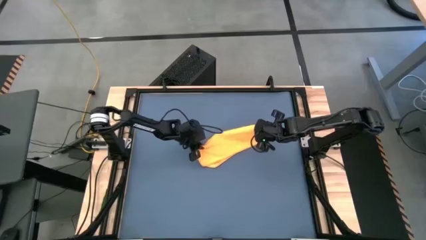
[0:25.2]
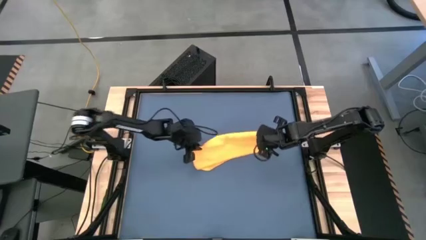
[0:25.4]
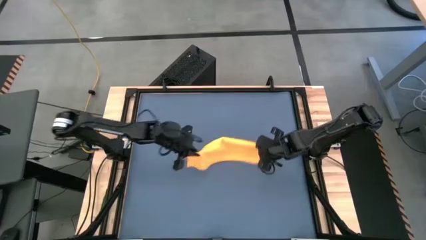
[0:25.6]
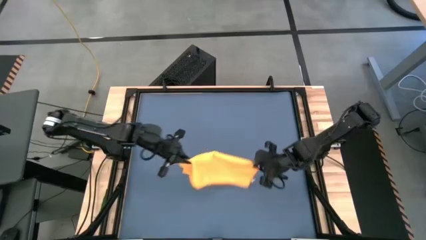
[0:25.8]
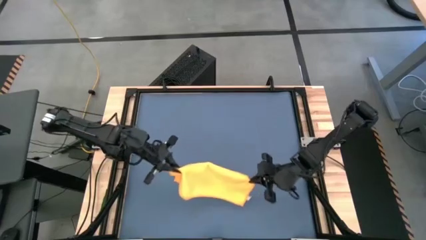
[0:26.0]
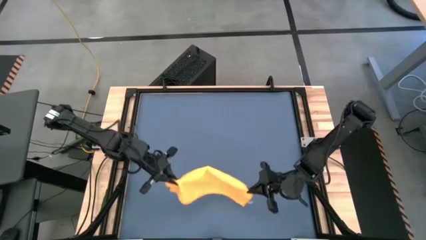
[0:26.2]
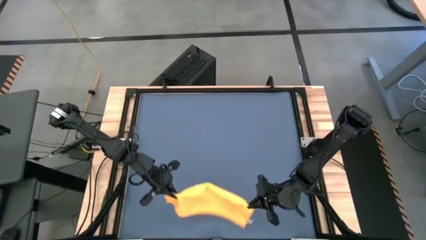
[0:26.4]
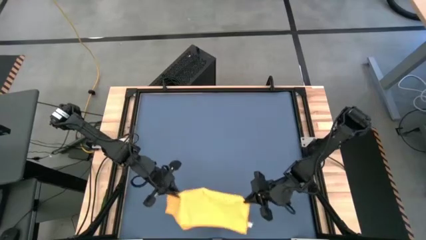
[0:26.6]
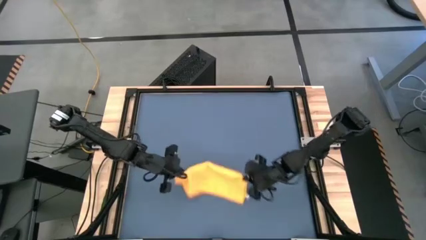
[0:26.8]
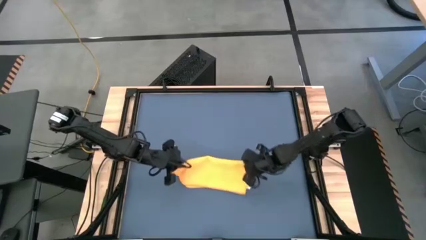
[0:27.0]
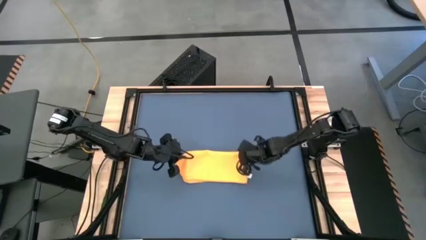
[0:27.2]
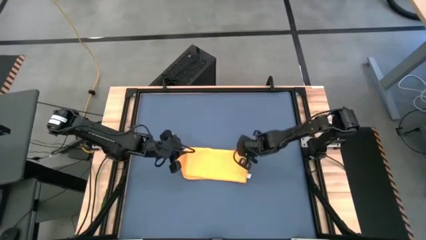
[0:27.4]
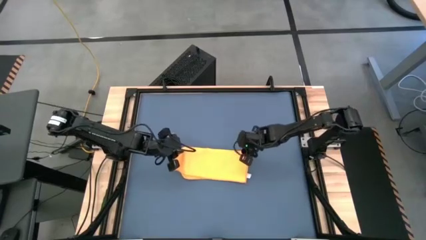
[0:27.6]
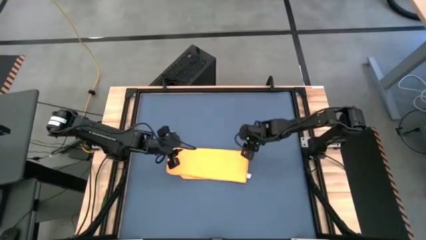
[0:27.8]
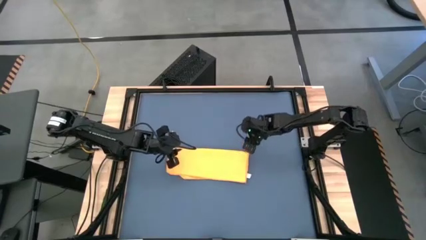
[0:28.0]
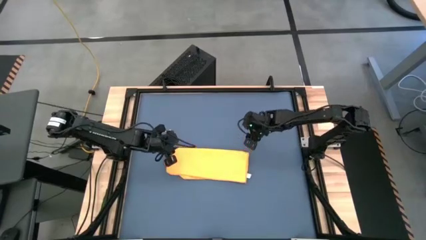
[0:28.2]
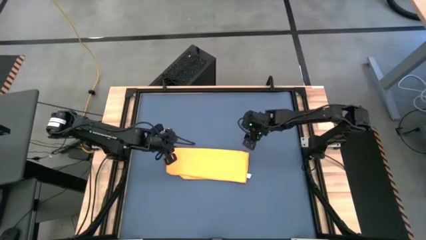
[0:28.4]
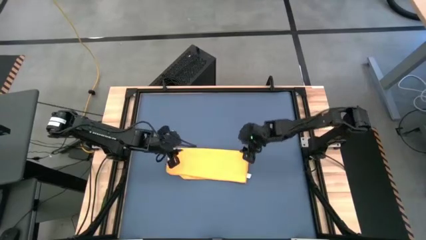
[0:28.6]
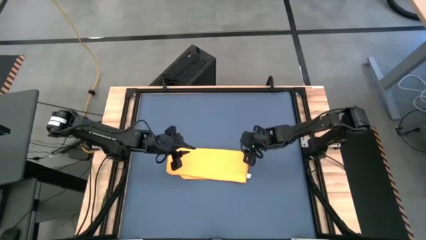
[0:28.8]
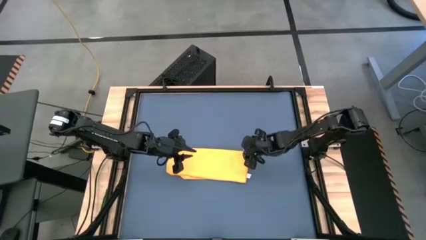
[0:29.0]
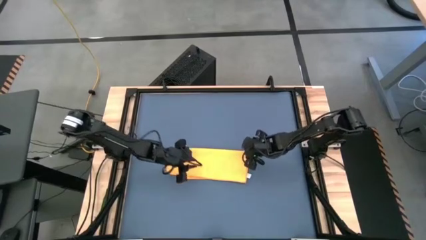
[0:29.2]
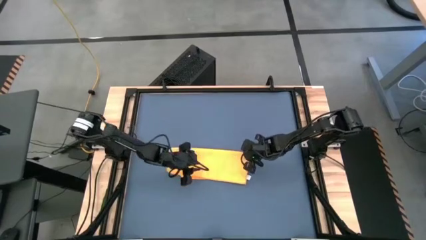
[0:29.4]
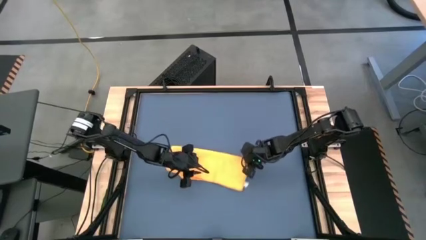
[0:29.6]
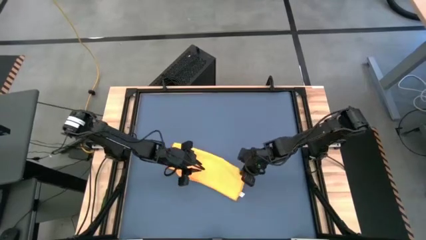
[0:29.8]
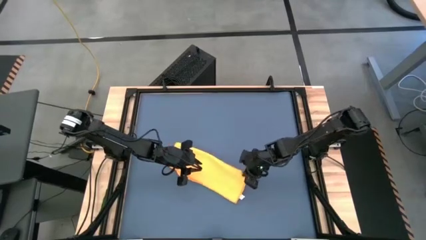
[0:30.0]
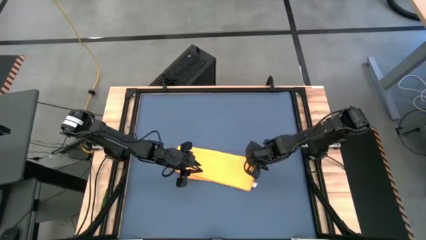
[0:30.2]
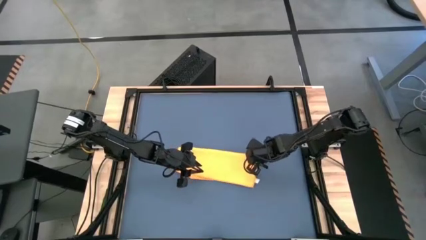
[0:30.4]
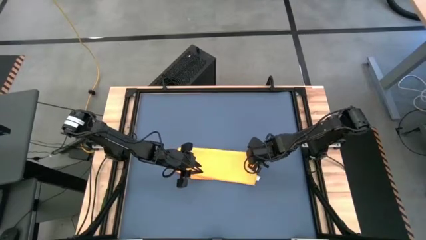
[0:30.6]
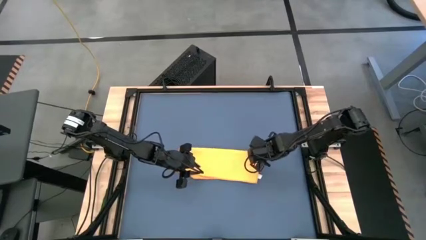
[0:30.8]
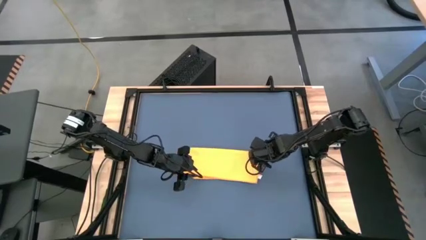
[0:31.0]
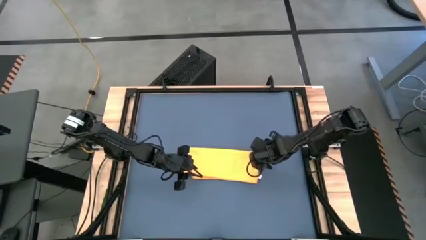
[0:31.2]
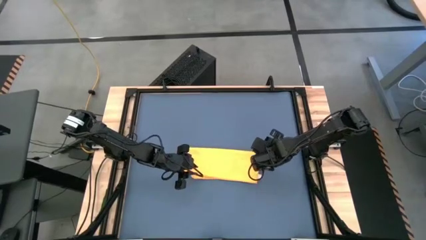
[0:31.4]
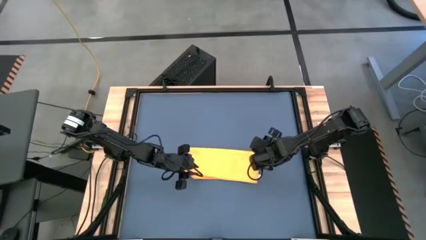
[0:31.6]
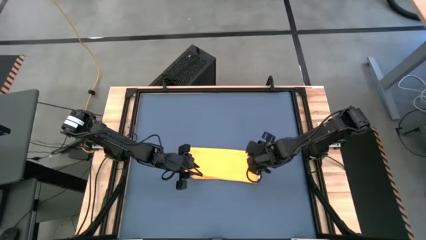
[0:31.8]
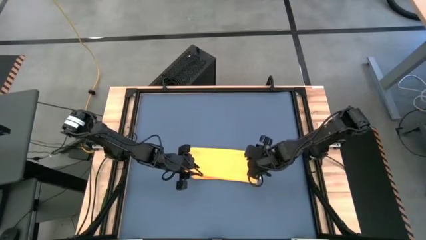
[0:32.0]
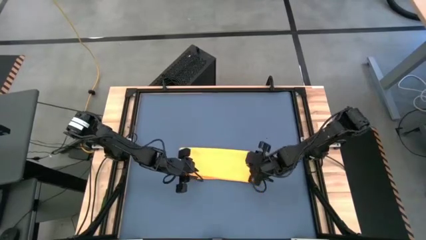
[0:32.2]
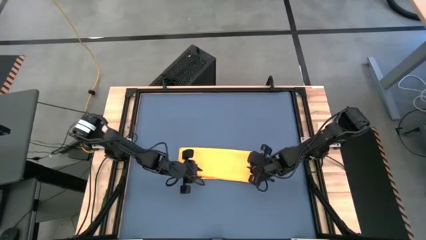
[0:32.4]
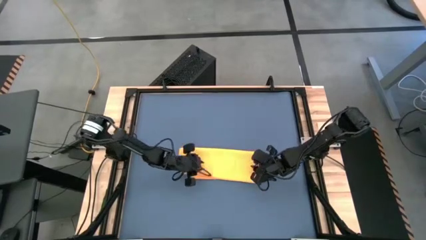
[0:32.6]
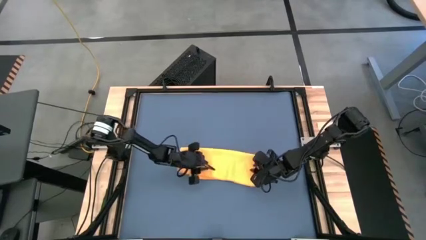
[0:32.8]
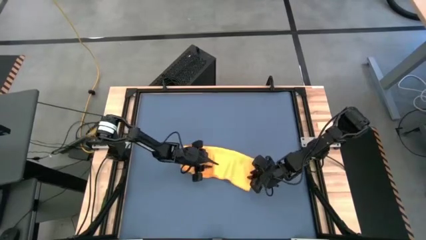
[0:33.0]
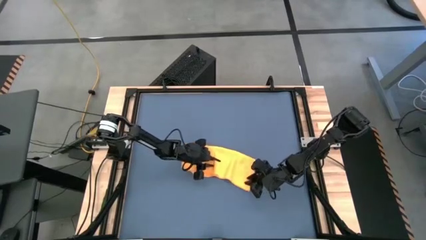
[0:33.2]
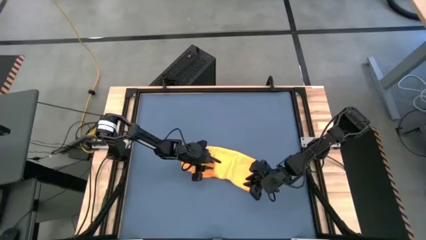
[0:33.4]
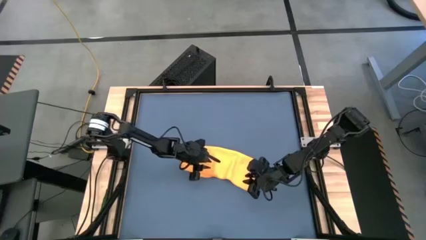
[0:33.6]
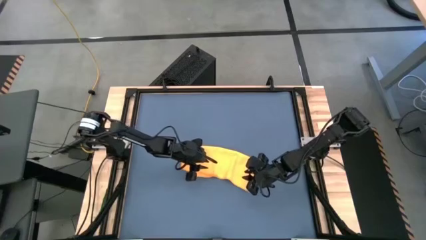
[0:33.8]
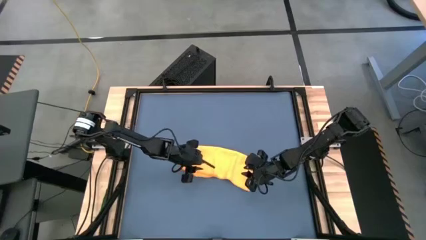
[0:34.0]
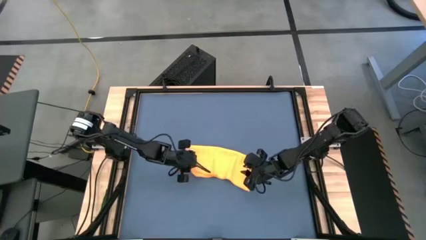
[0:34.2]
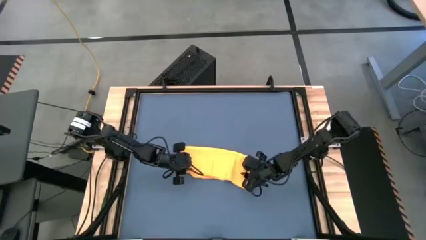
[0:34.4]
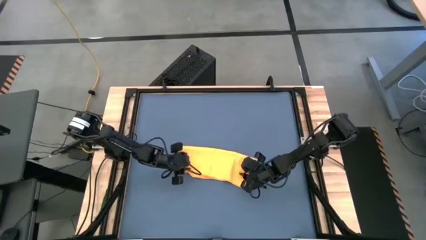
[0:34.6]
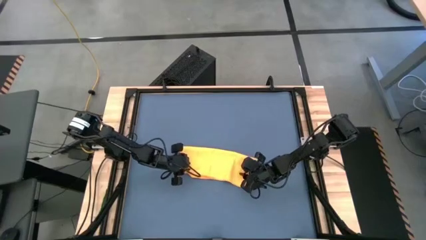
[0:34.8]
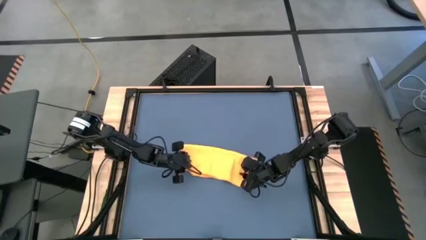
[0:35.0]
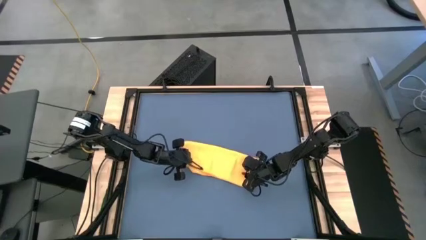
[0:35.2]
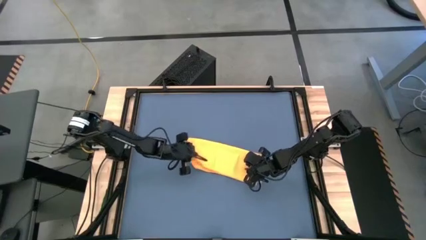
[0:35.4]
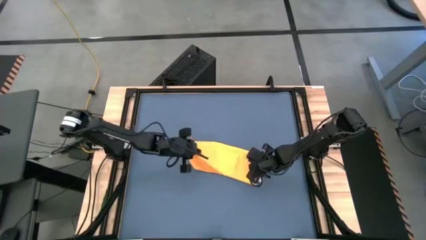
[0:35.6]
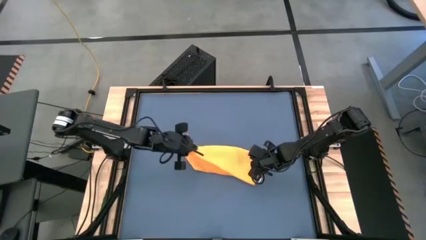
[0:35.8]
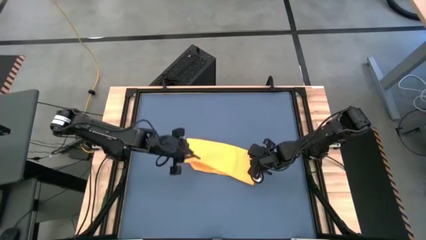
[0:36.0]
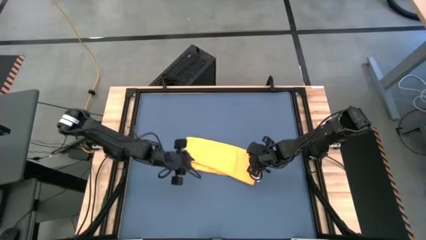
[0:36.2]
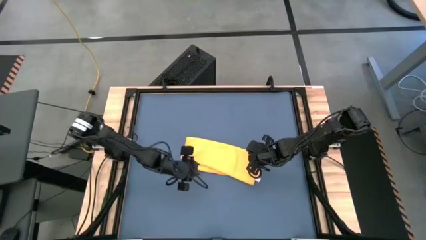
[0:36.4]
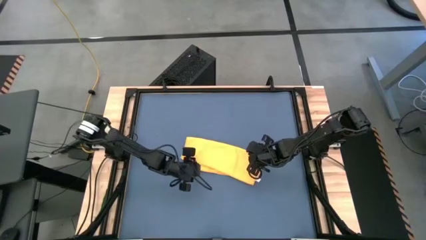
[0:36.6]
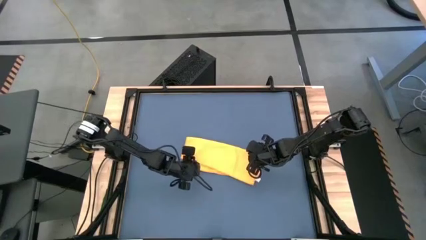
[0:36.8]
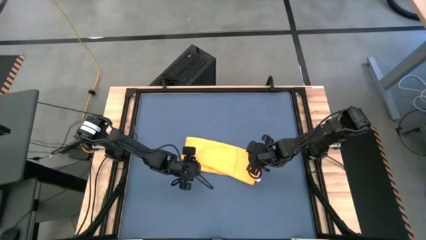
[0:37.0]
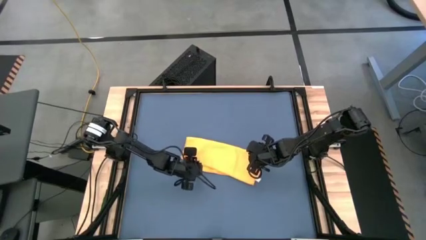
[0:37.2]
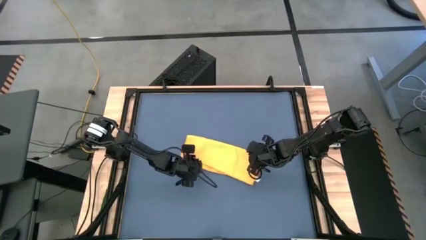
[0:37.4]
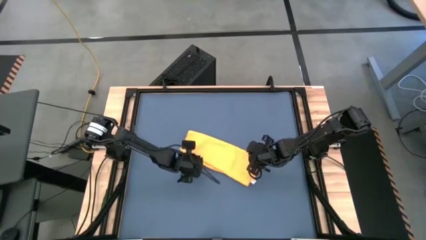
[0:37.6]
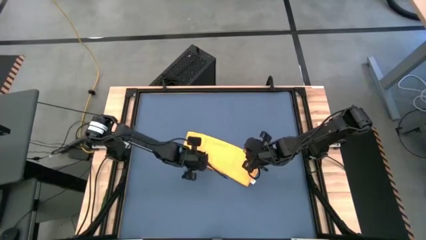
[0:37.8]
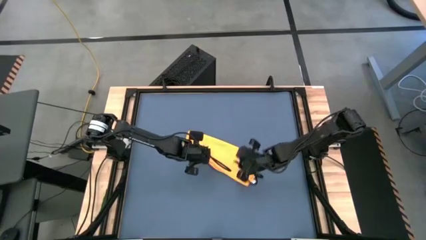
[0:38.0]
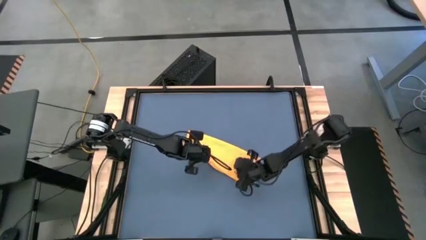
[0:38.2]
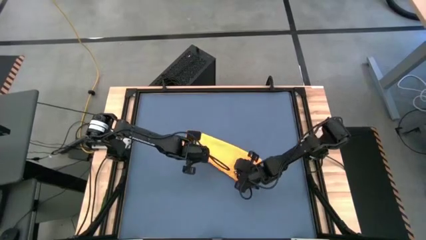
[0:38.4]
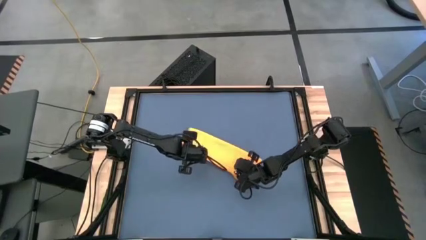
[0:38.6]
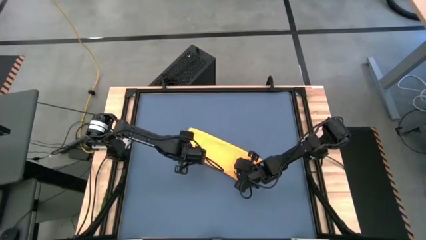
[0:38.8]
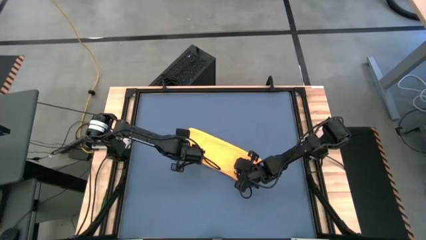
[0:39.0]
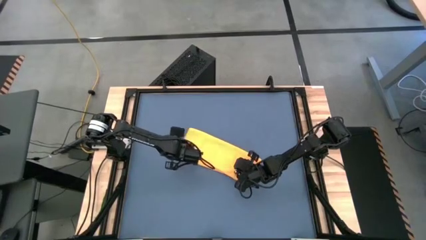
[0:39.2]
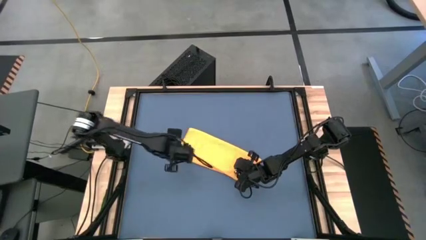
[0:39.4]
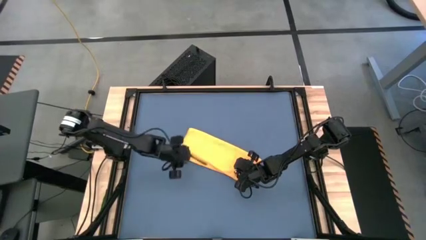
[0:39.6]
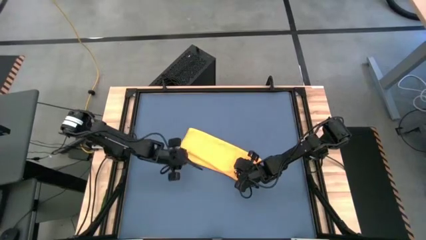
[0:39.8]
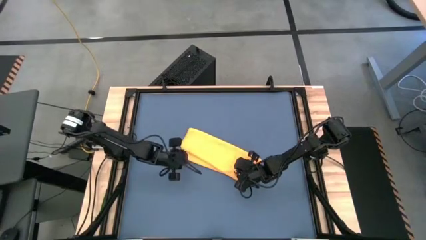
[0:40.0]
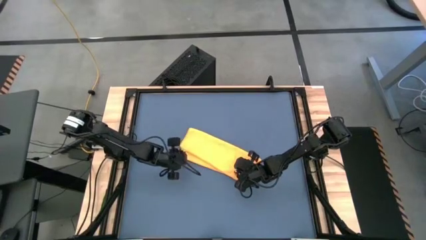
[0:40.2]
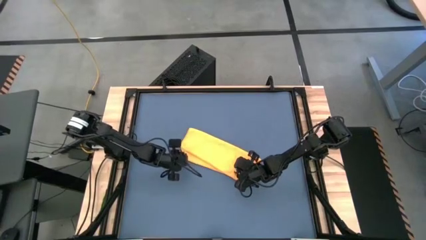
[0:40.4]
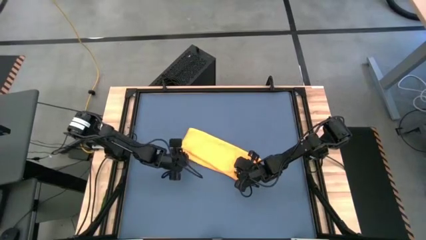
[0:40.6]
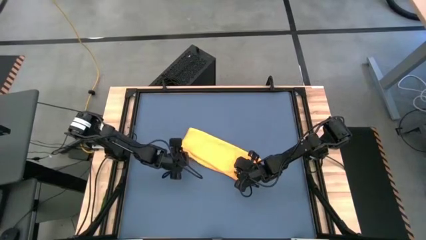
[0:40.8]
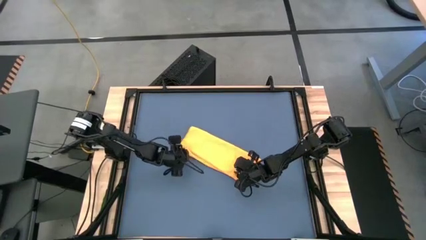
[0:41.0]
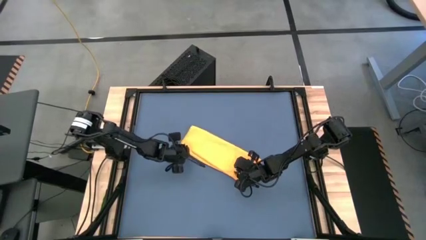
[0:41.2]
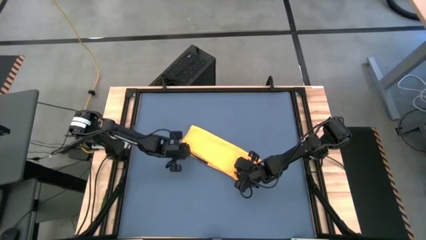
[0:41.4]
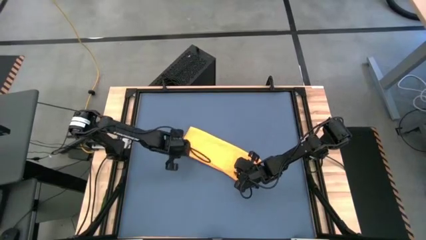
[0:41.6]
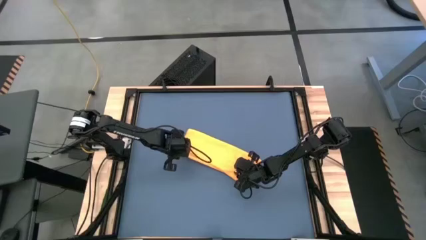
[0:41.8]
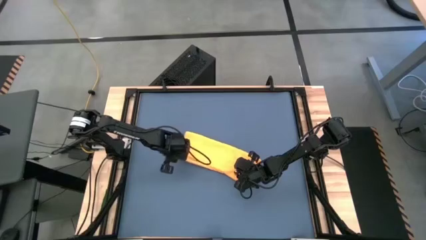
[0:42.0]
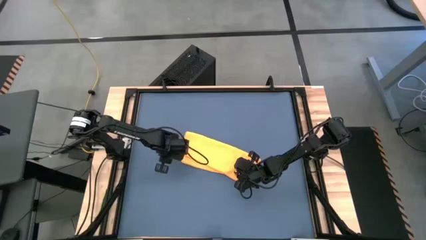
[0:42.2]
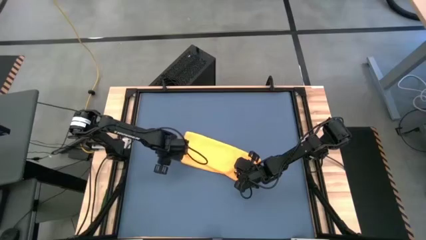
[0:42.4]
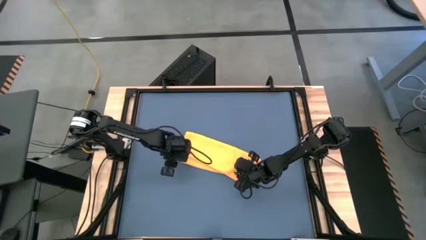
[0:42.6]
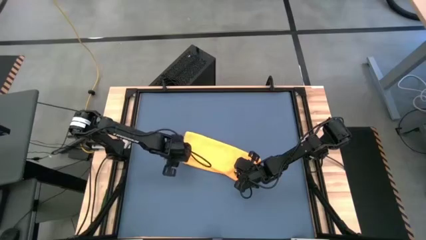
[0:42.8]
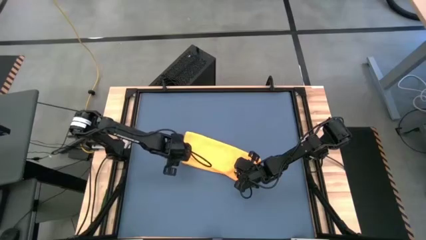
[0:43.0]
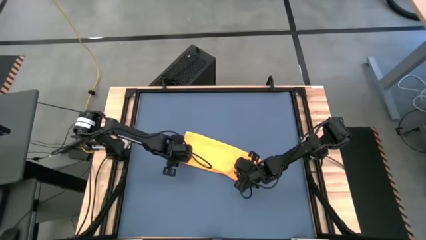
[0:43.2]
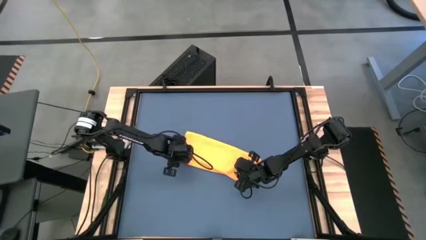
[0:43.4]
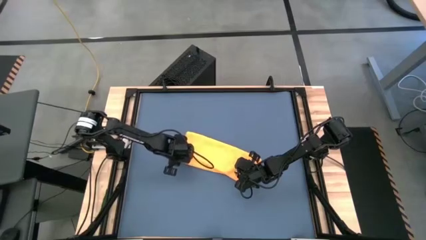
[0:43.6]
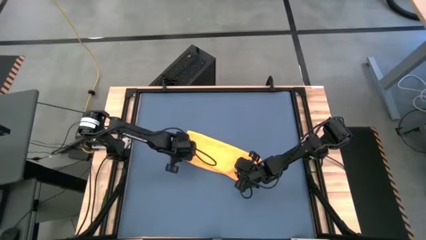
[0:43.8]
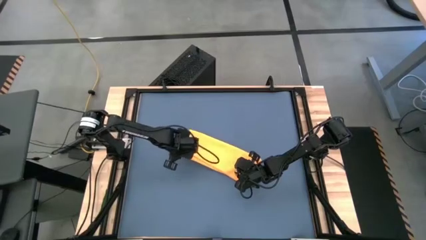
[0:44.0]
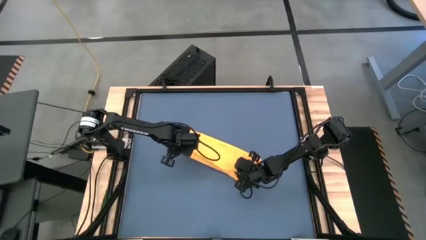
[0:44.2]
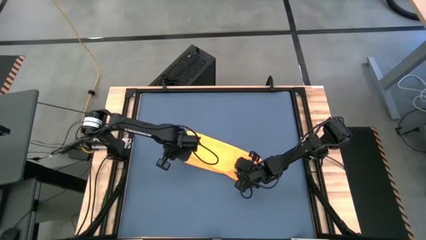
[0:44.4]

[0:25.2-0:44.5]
Task: Roll towel
Fold the orange microfiber towel
